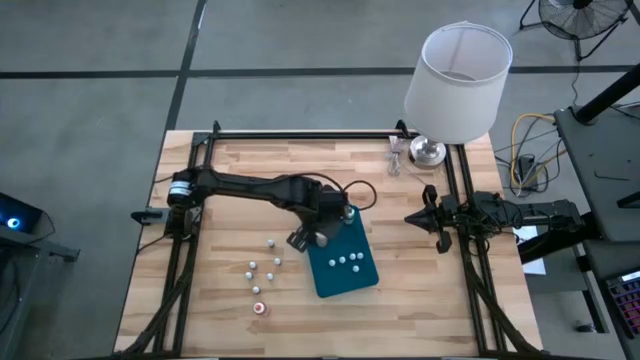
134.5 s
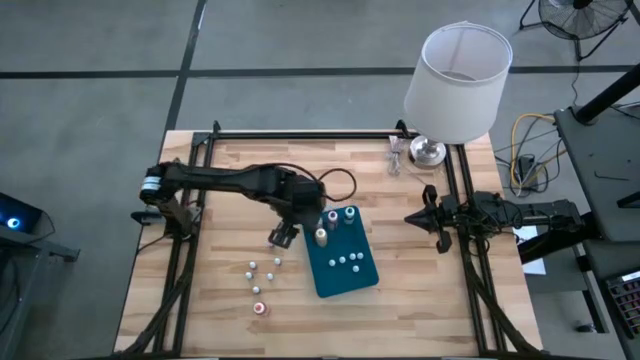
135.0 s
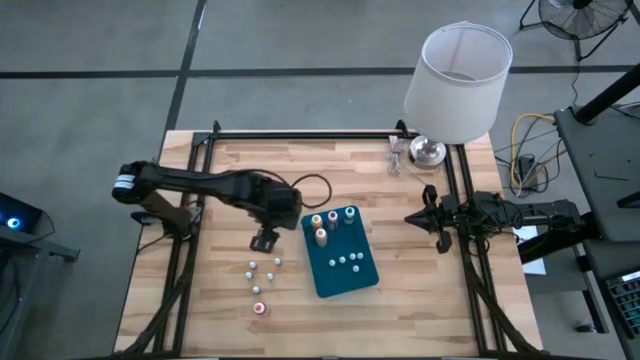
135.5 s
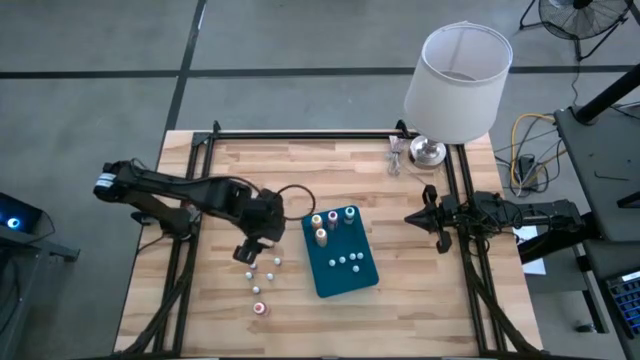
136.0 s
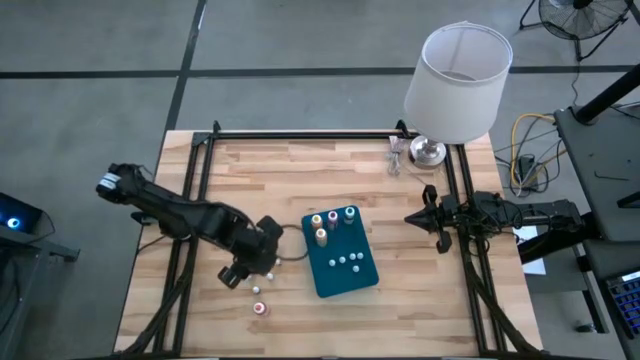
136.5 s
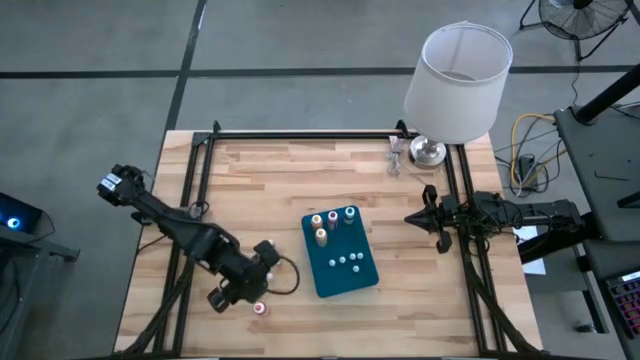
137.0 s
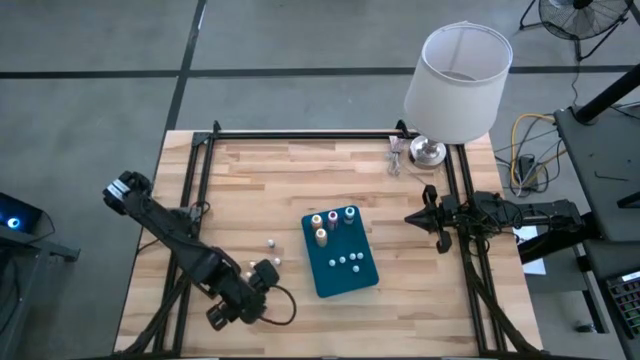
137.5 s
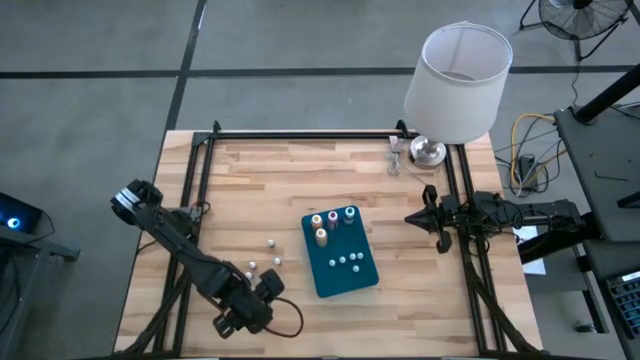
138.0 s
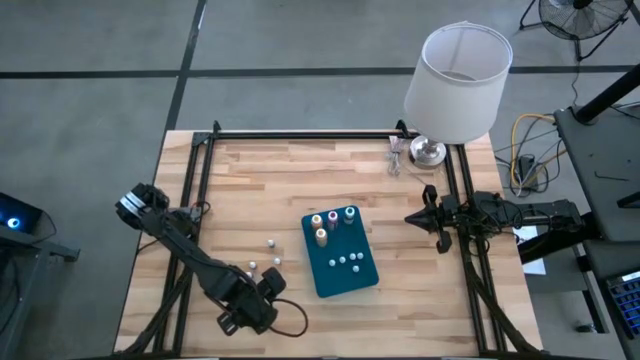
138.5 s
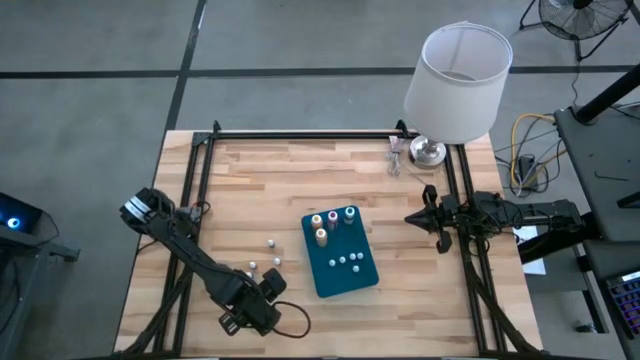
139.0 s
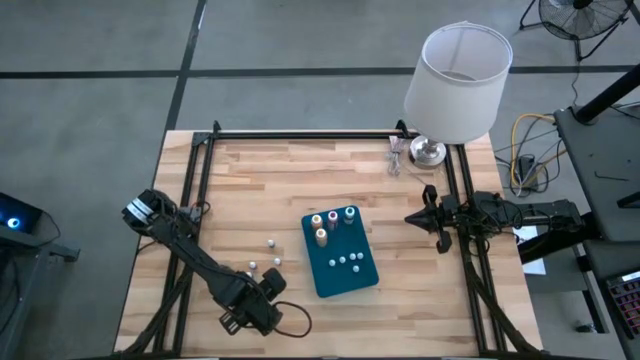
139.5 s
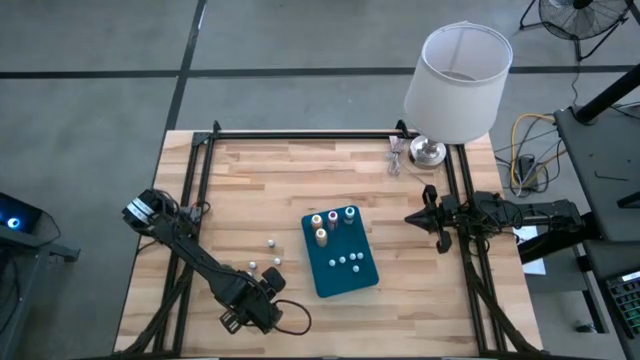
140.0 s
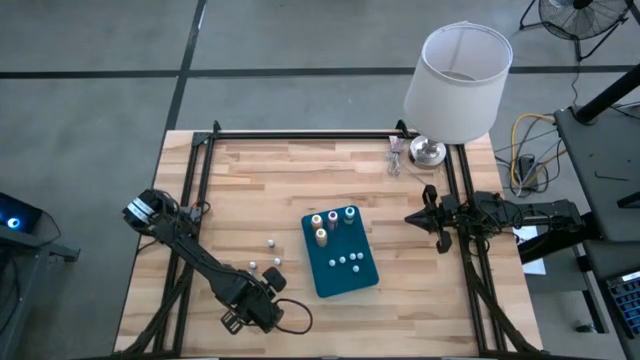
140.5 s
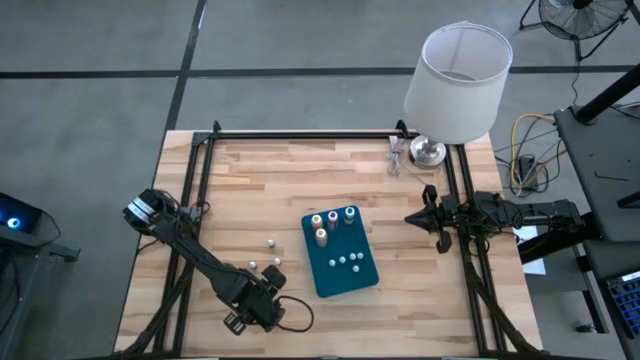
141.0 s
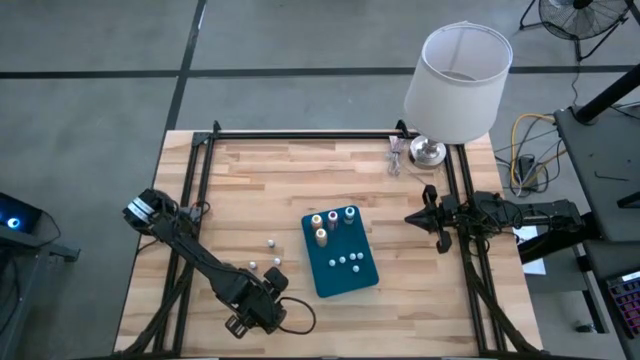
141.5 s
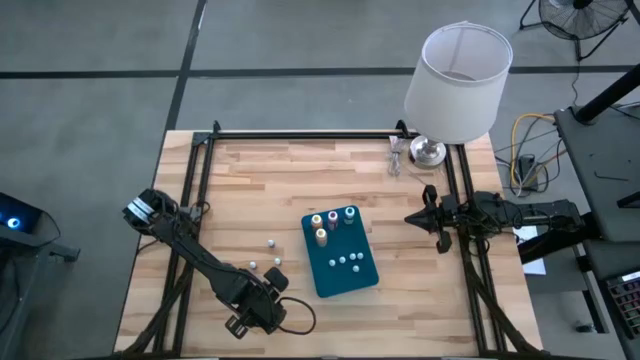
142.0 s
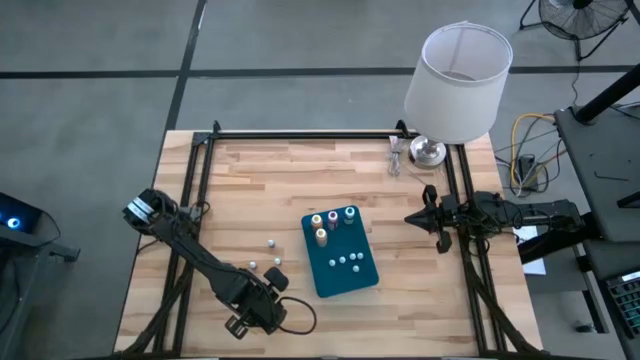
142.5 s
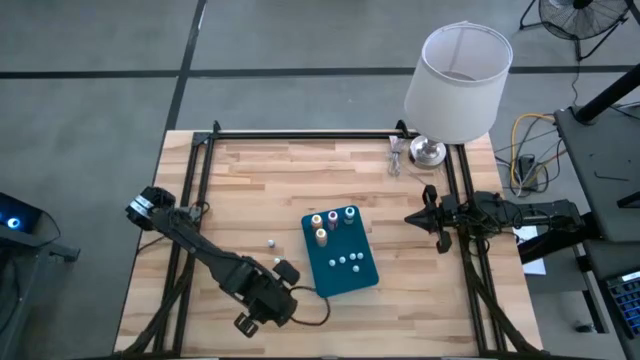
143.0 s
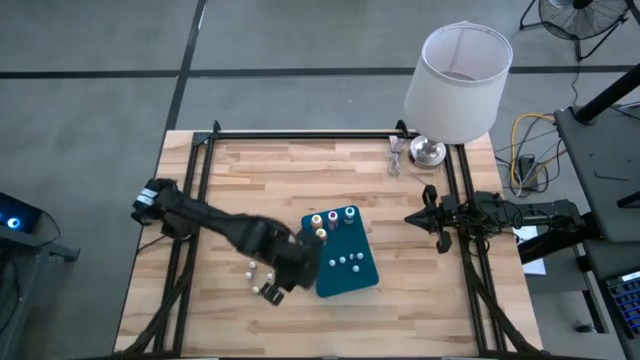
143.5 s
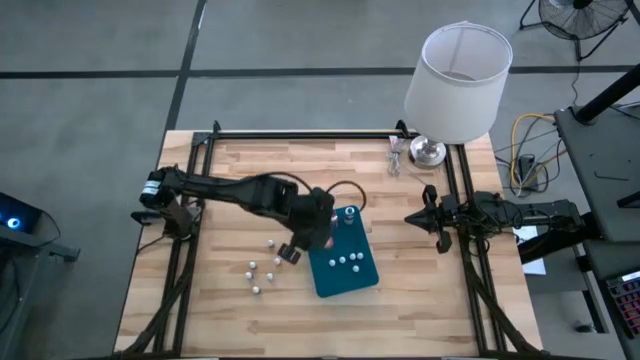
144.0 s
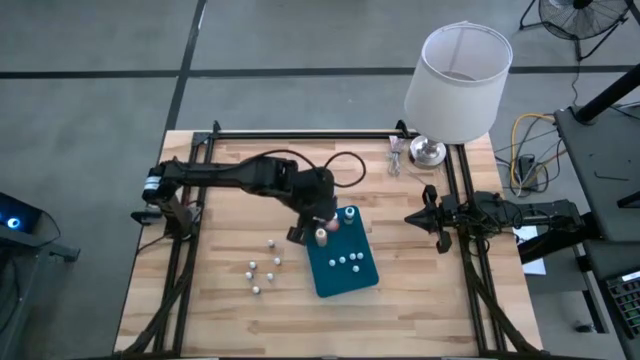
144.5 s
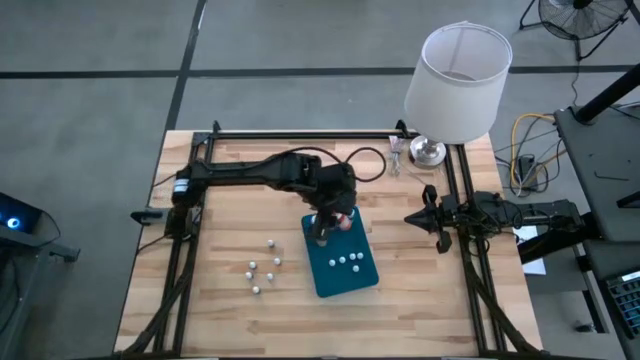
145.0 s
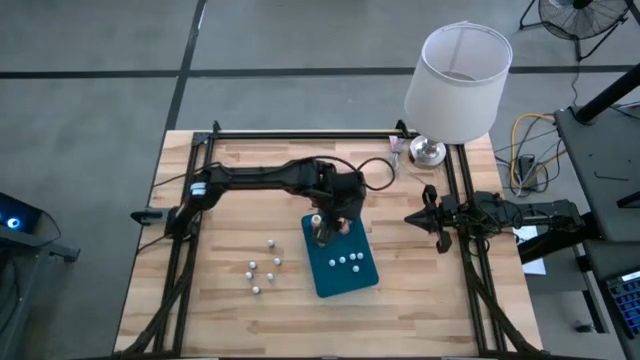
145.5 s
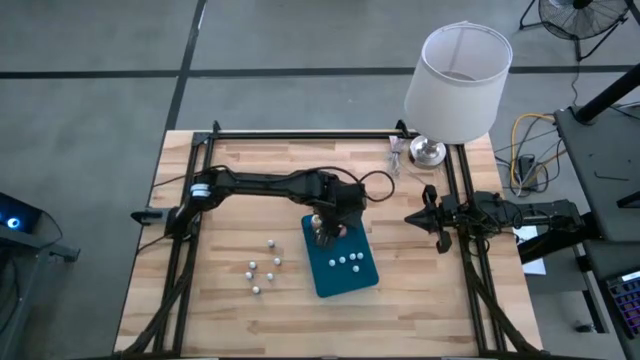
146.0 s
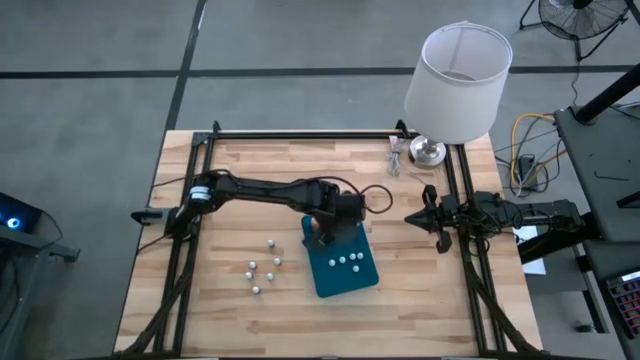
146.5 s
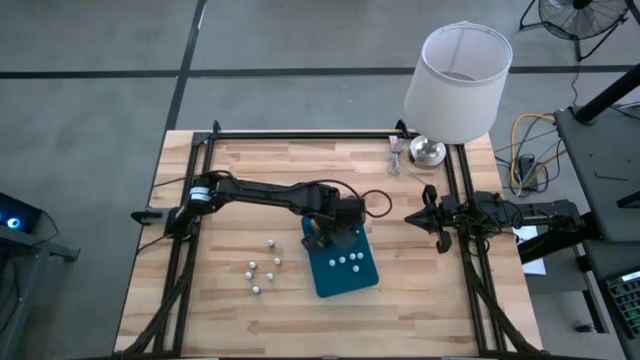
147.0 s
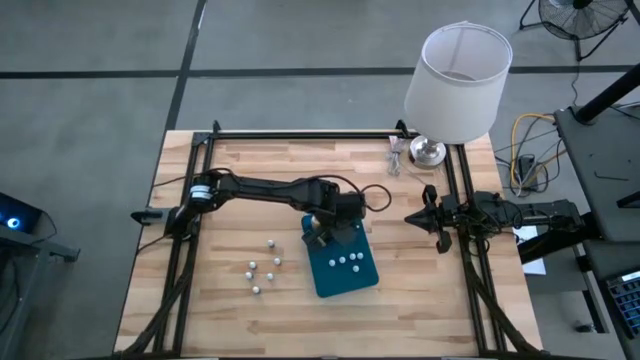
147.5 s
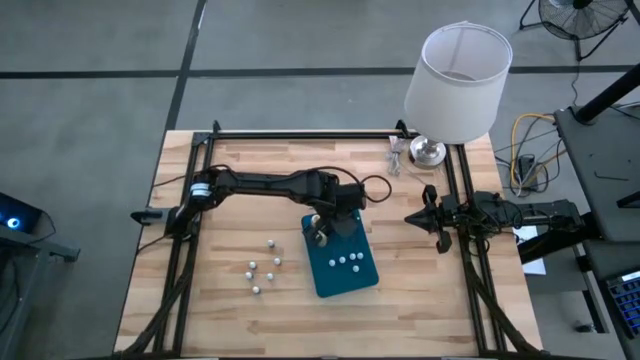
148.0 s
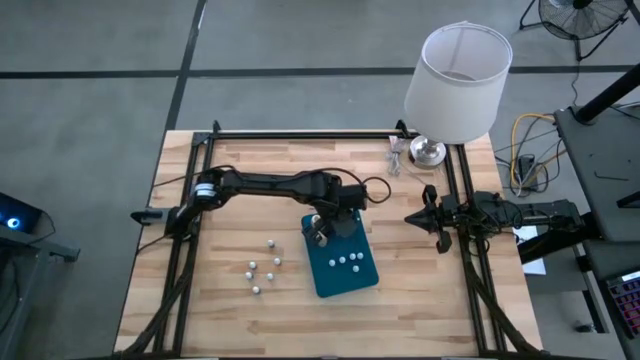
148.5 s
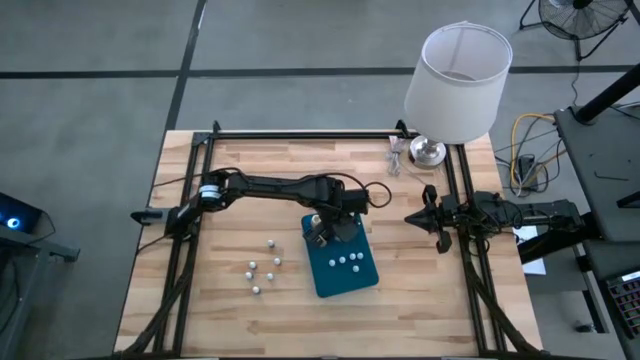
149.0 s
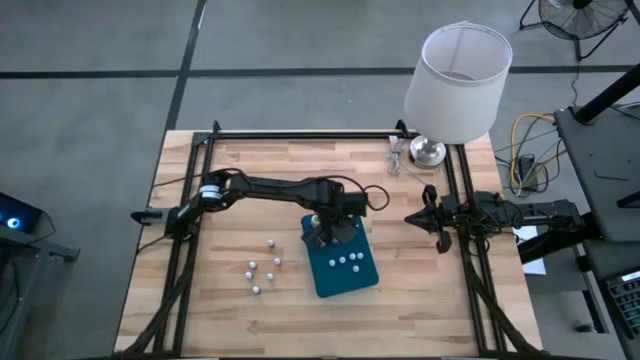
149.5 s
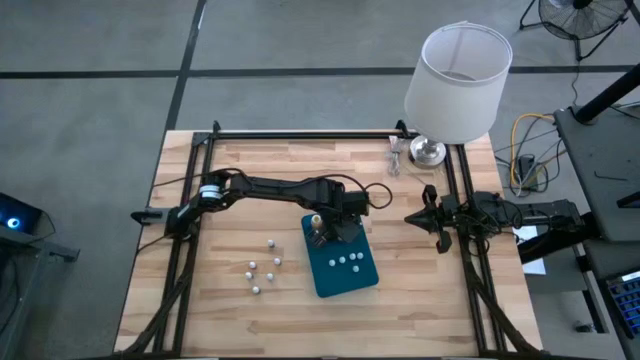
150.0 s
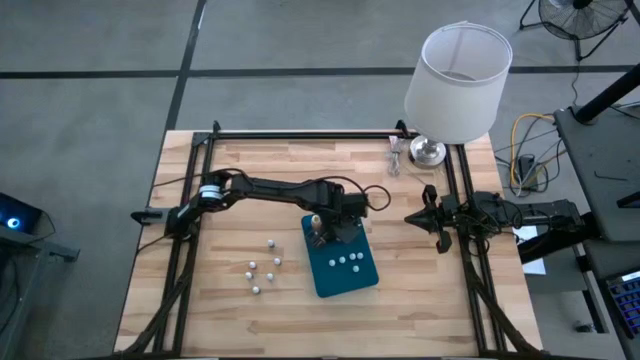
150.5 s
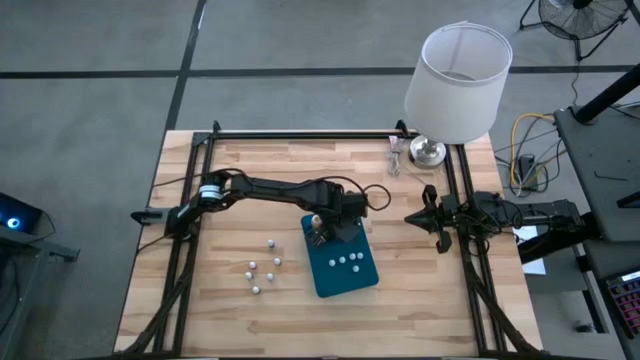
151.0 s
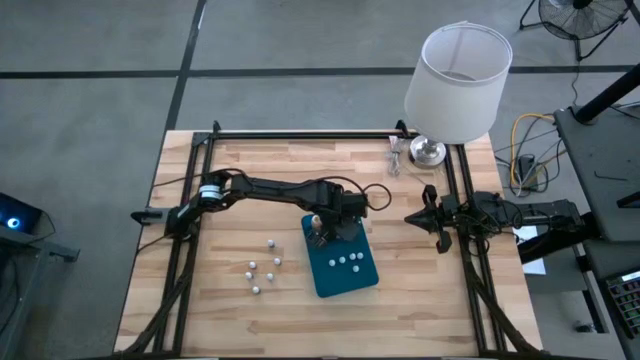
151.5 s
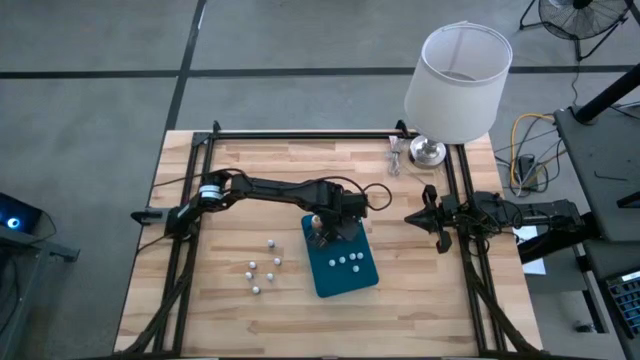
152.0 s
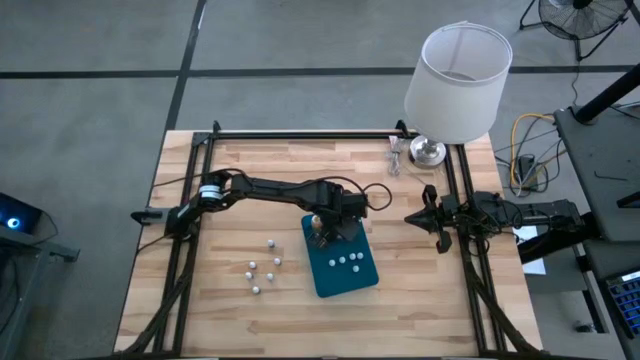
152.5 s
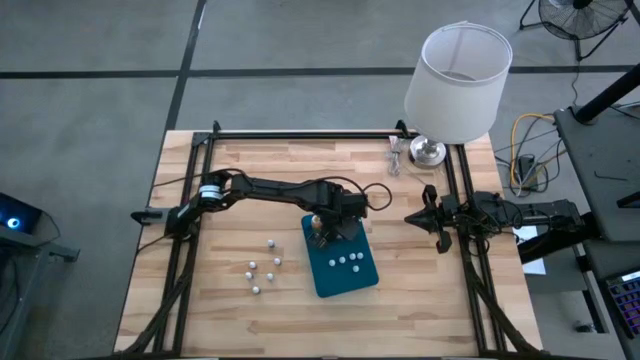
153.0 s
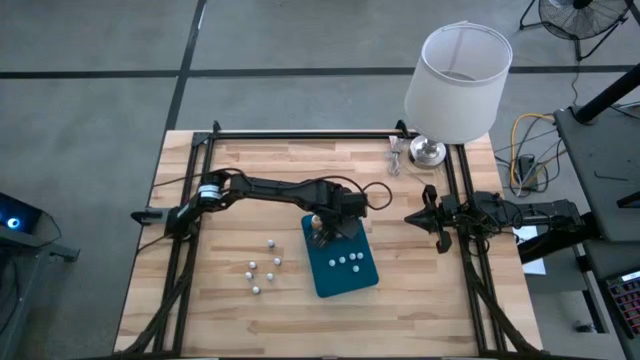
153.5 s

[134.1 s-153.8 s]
Task: Pick & Place food coloring
Put the large orange food coloring bottle into the blue bin

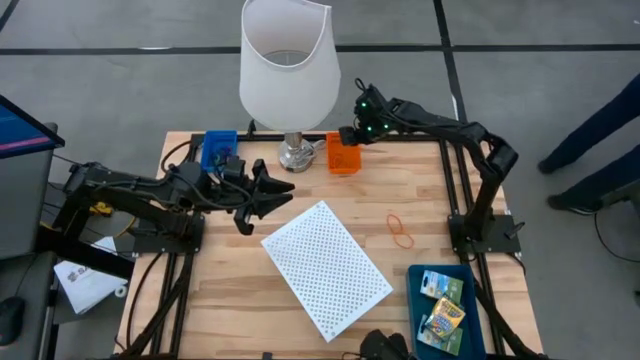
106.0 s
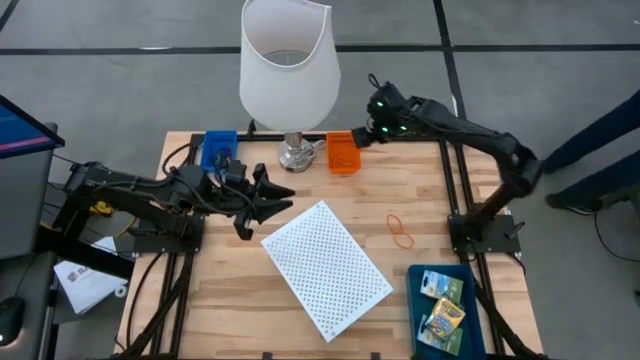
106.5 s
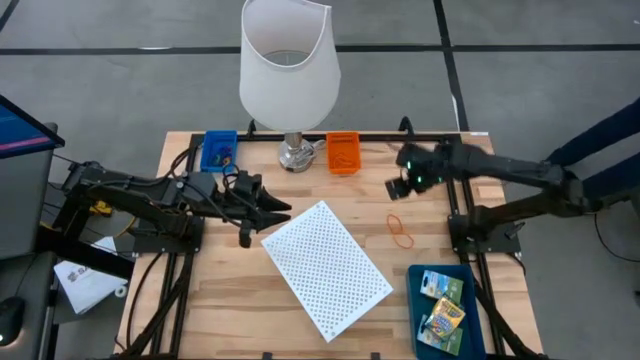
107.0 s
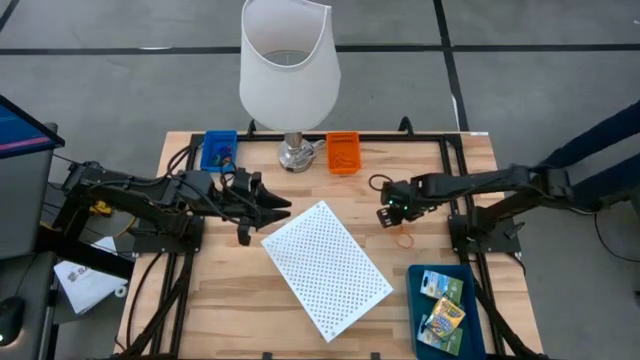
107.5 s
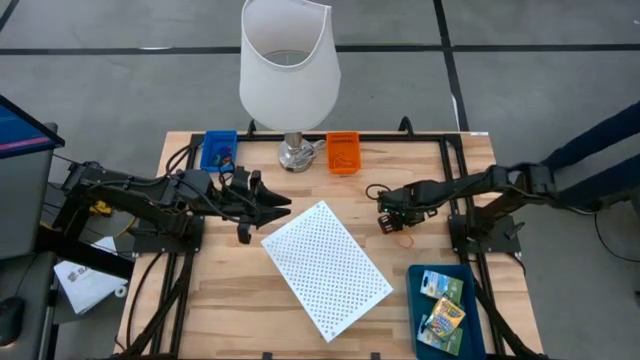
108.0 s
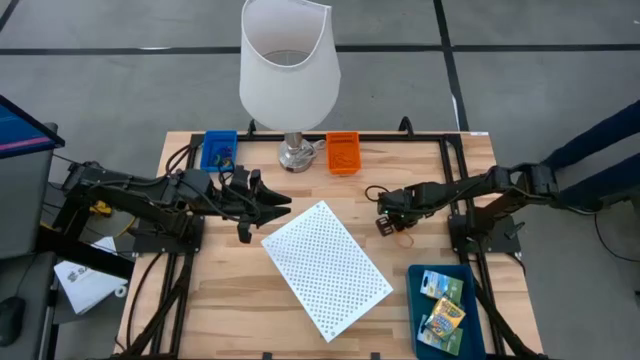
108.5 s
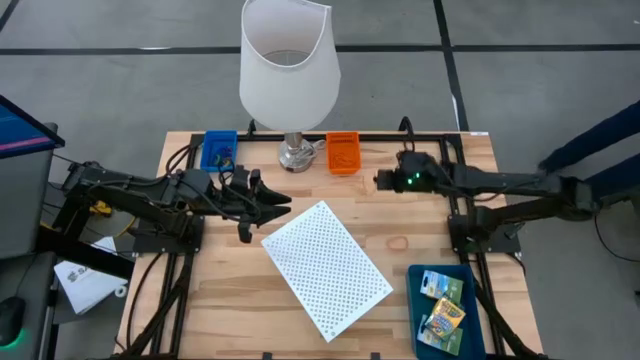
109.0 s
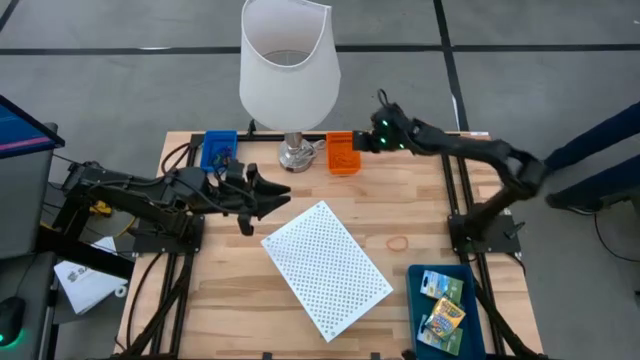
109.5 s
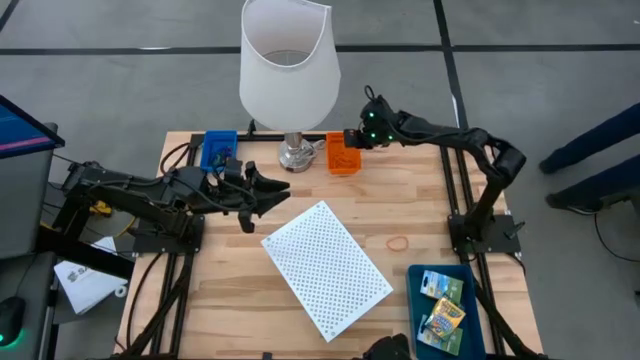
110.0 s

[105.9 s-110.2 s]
Task: Pick & Place Office Desk Supplies
Put the orange rubber band into the blue bin
